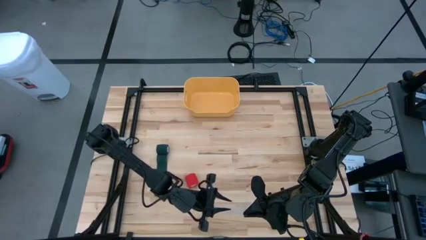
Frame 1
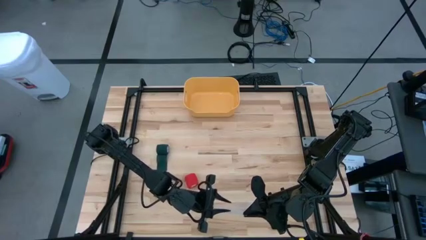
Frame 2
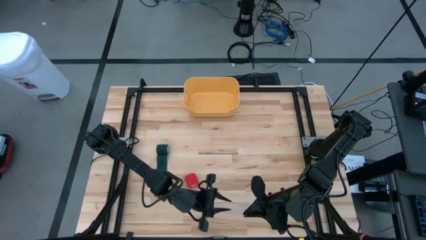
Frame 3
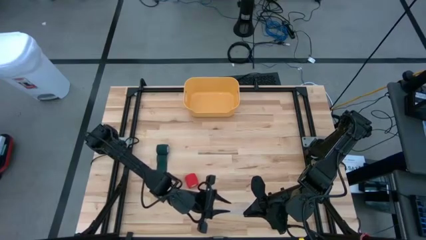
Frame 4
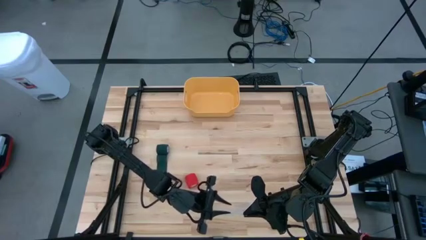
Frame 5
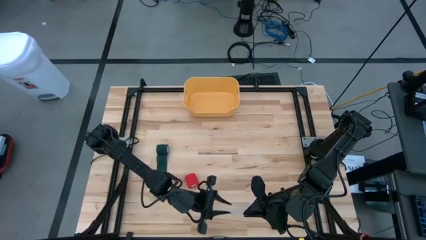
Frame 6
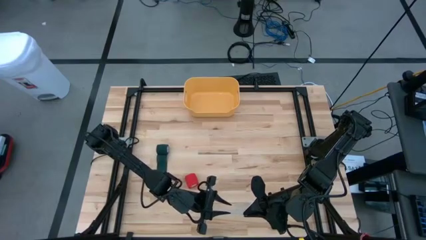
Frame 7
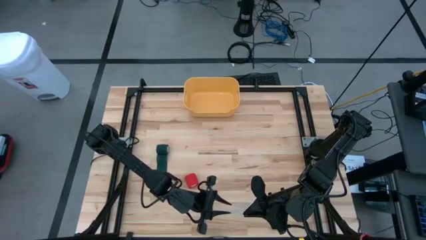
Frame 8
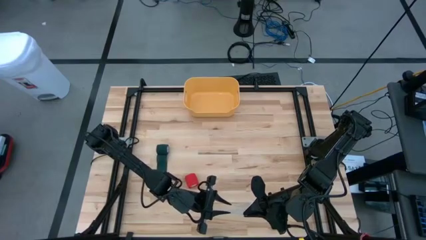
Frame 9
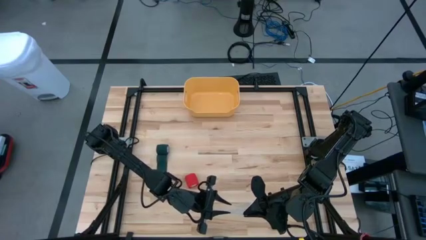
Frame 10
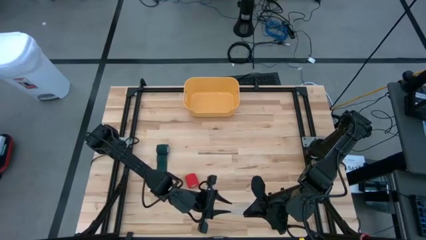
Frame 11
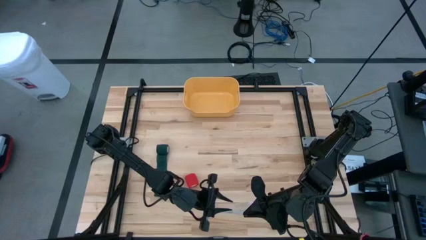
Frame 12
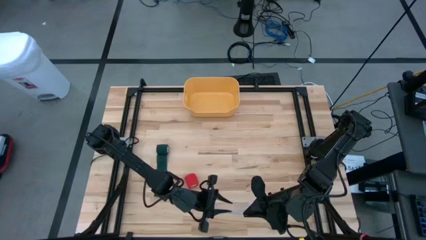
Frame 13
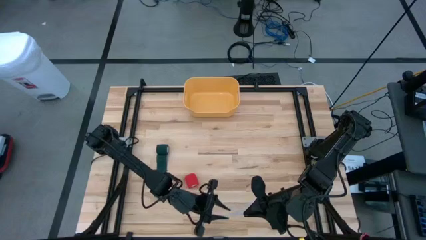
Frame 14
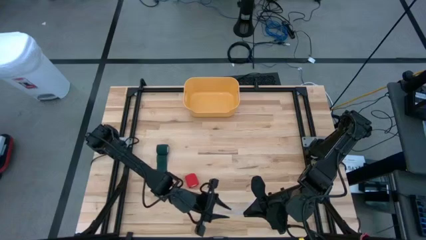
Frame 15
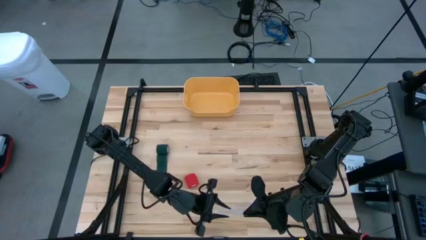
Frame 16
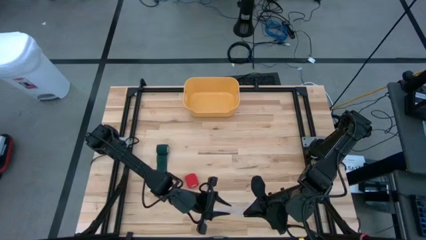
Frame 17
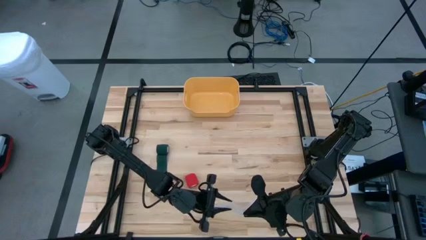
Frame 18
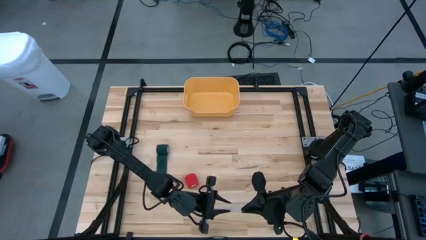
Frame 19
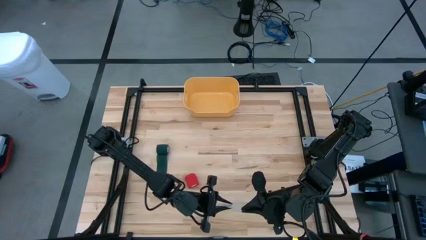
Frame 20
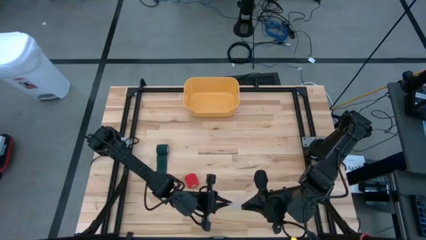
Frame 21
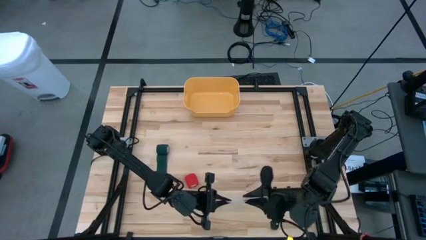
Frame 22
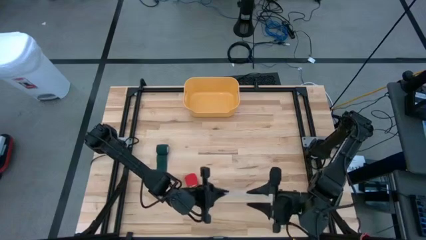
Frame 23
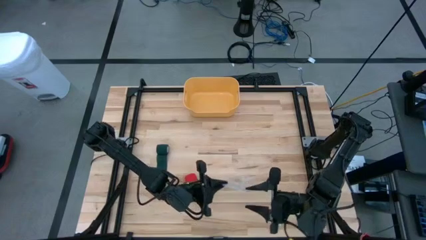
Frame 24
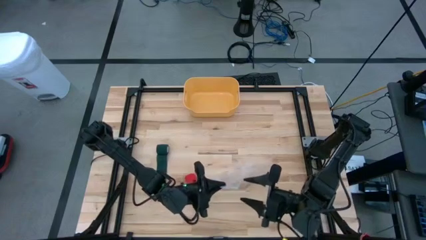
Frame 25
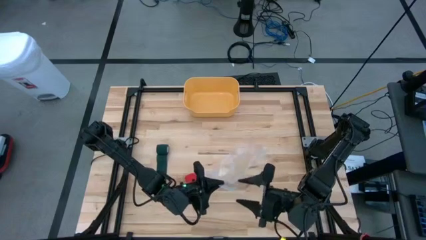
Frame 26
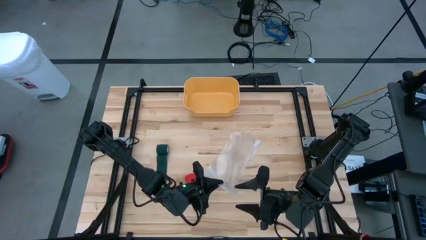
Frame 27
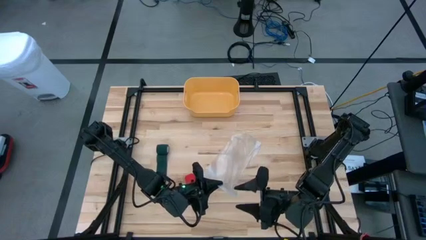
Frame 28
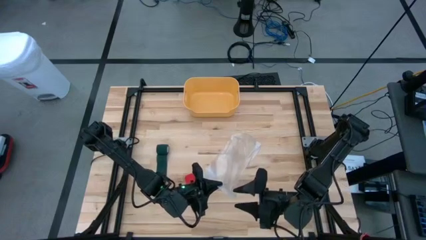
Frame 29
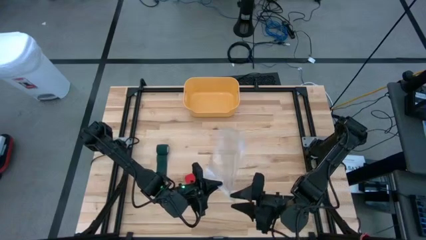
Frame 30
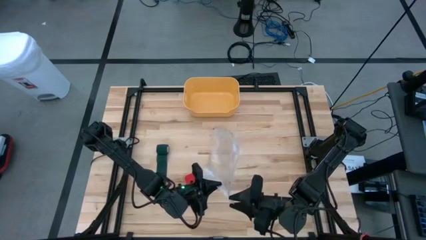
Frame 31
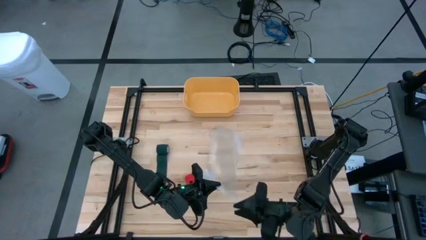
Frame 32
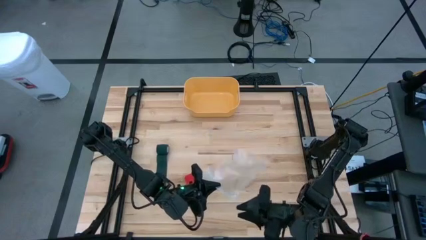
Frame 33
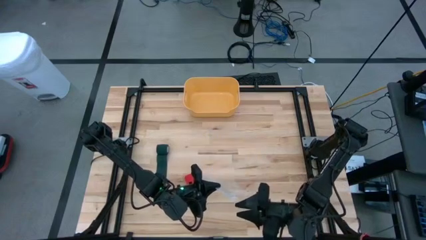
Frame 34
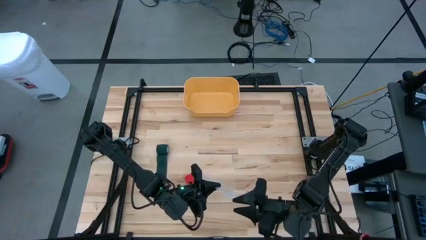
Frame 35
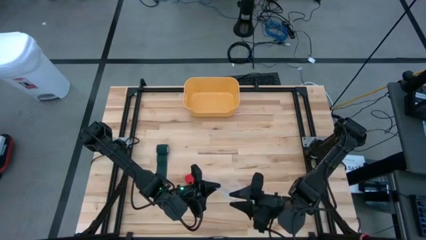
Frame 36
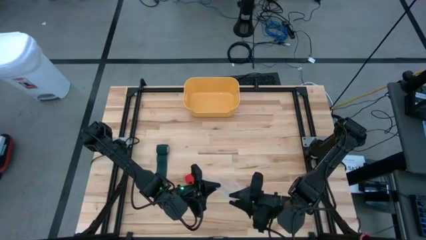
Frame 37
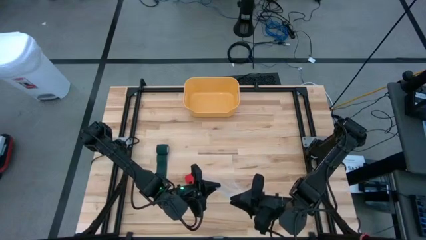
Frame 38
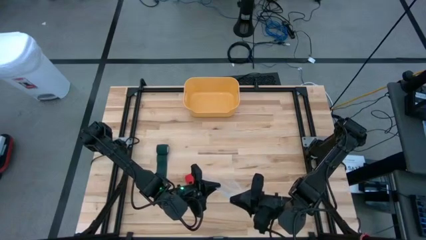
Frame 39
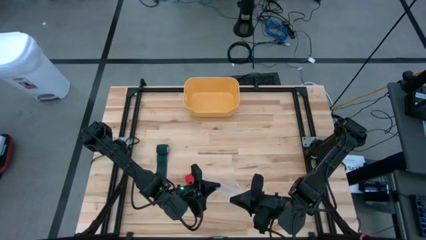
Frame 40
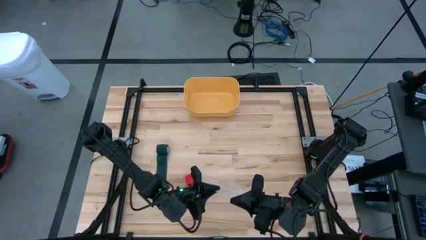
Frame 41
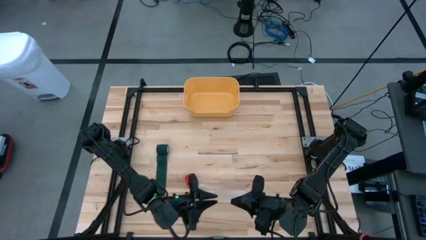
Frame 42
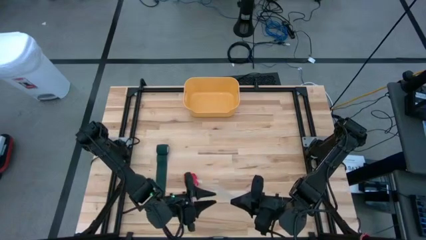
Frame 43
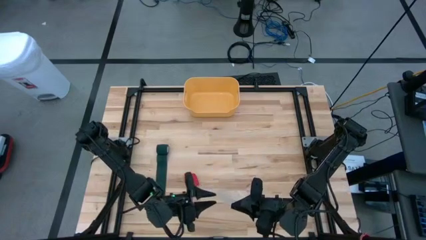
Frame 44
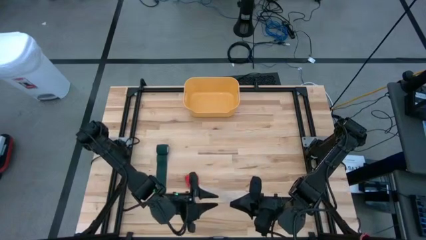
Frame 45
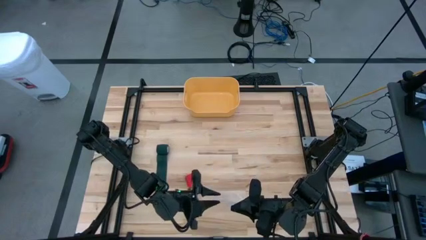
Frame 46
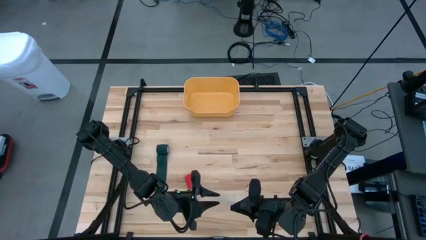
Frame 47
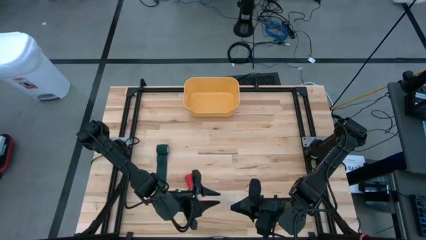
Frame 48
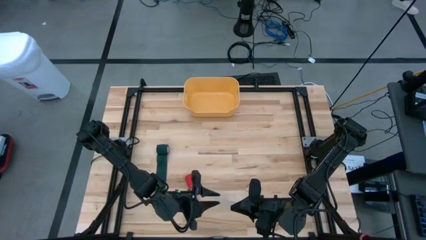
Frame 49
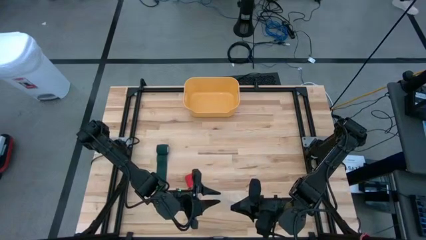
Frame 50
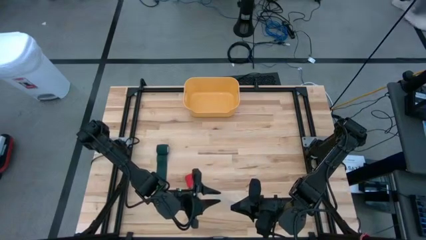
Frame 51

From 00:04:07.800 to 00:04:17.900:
Task: Roll bandage
Open the transparent zip bag

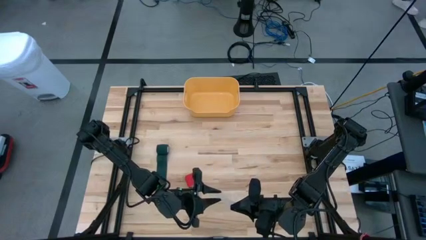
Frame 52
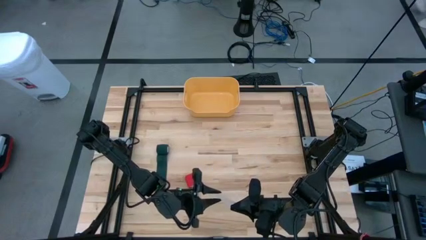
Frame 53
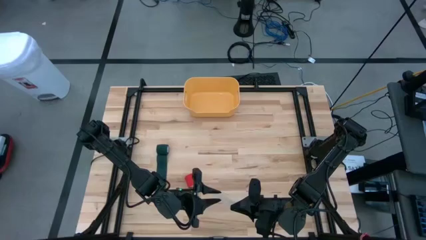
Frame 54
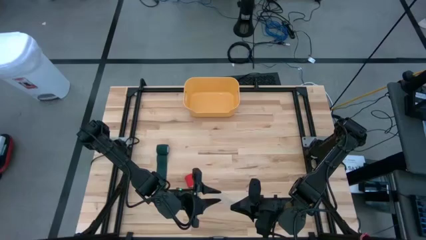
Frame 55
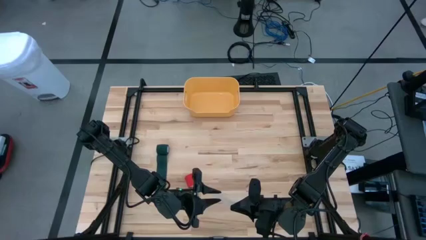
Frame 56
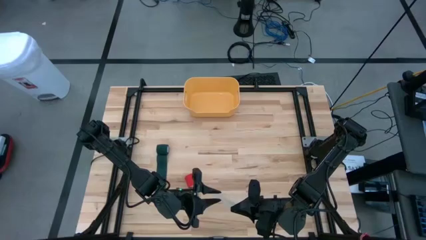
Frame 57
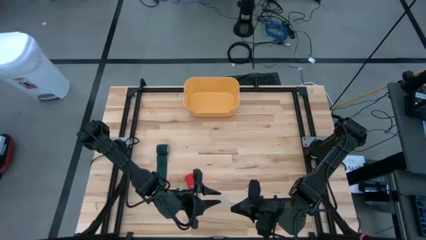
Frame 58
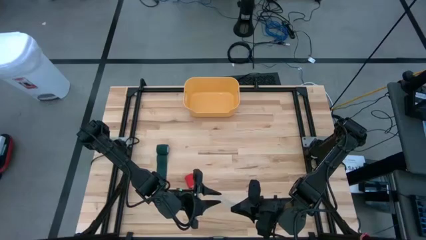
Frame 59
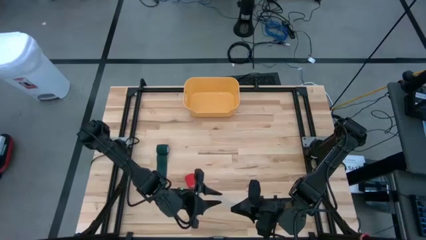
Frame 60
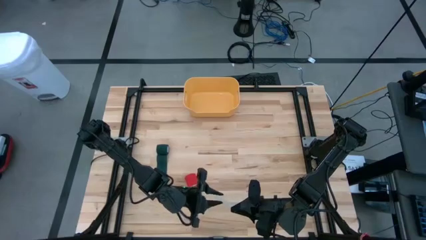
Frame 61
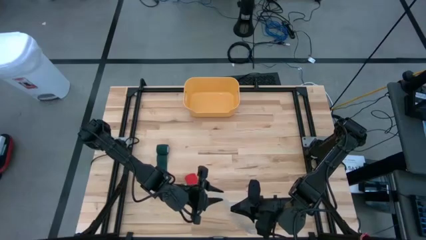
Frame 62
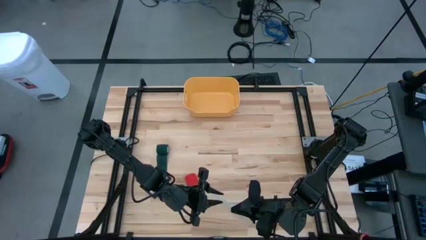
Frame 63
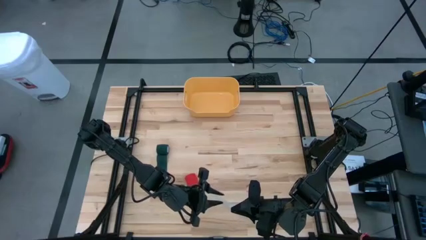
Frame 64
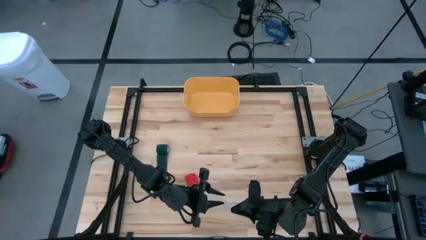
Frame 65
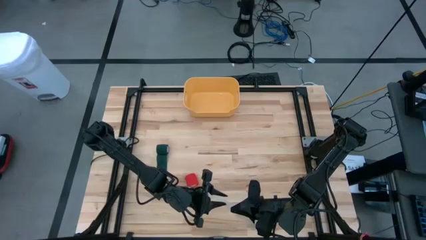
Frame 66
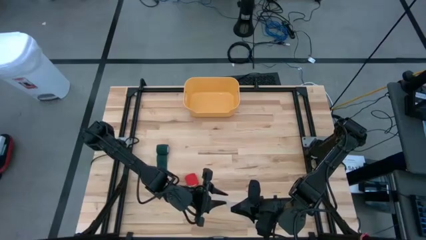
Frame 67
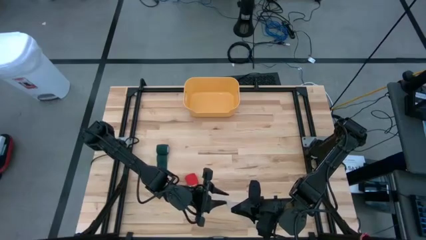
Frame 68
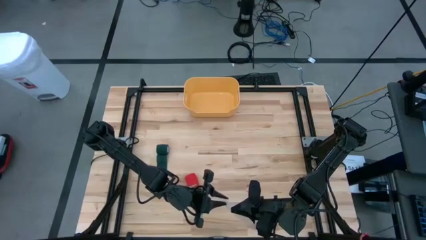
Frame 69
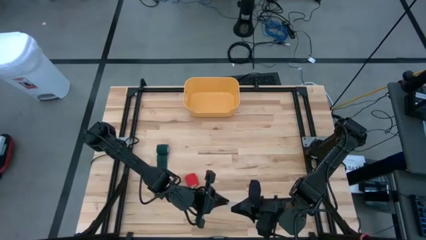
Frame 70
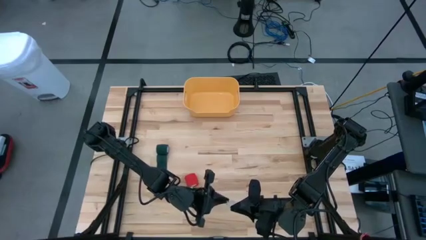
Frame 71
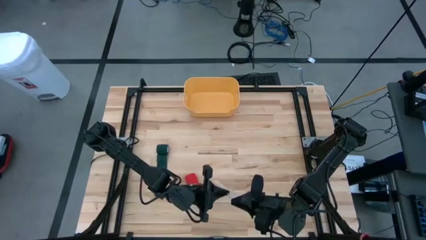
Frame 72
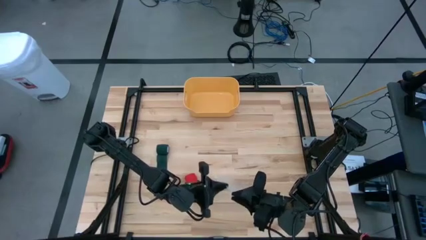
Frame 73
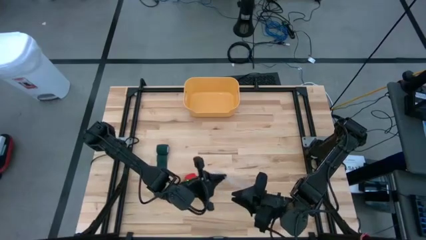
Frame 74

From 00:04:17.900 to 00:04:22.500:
Open the transparent zip bag

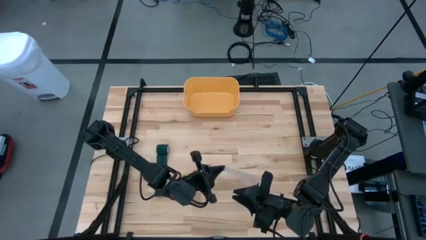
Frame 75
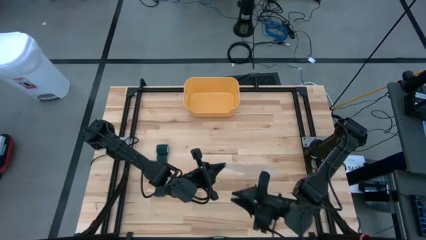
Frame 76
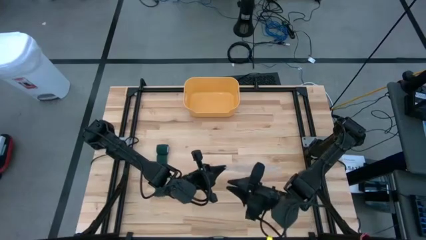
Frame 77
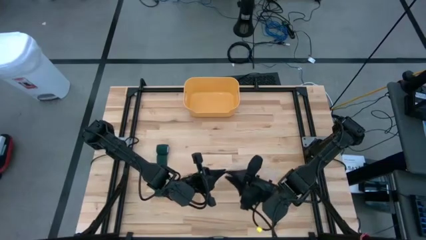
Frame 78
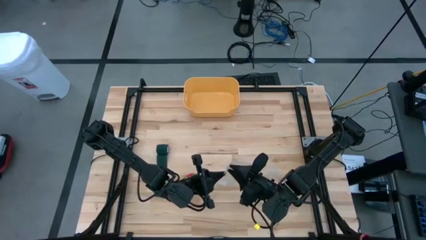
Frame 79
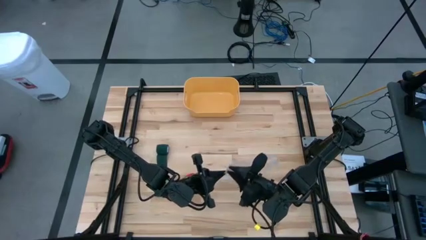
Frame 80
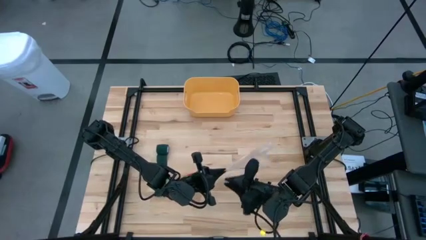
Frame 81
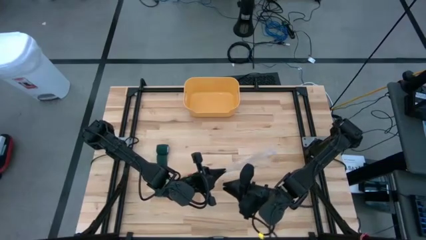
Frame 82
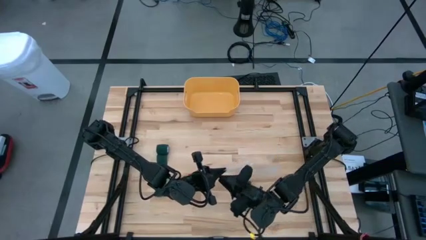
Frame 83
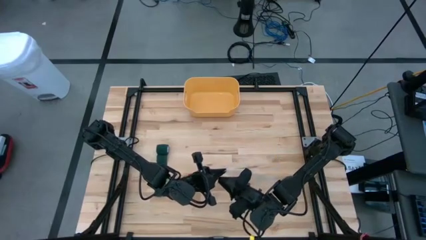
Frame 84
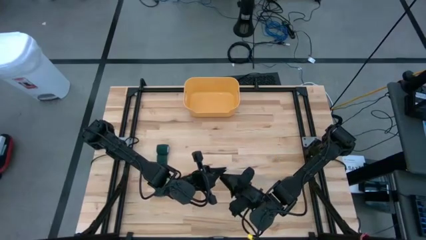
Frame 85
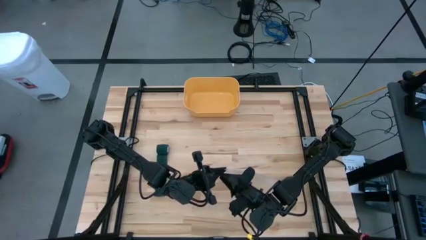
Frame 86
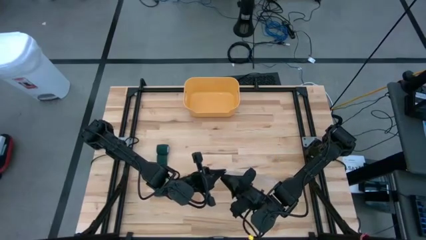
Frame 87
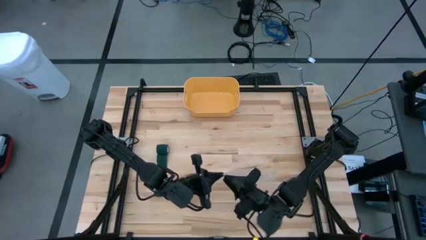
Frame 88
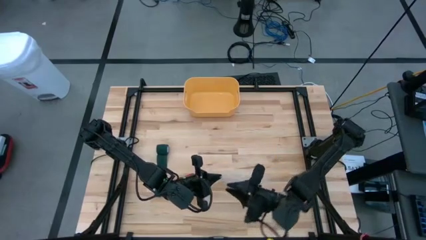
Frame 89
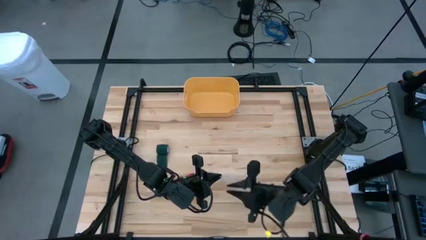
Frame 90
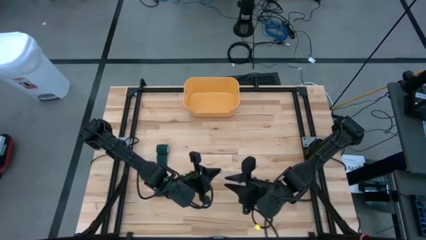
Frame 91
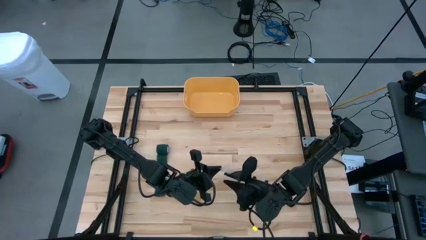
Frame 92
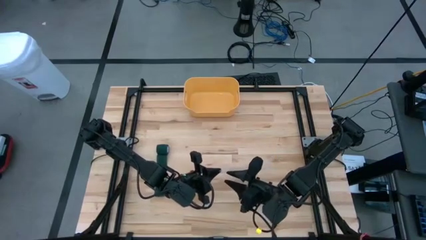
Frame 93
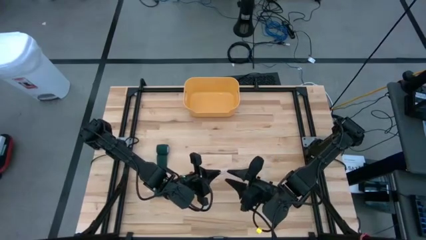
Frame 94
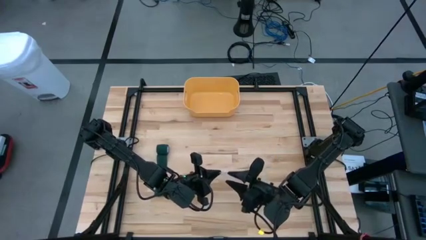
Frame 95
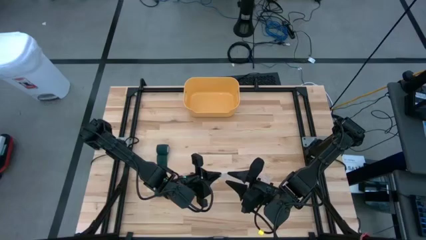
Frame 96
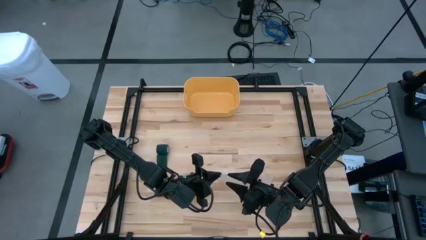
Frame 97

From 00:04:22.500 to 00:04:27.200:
Open the transparent zip bag
